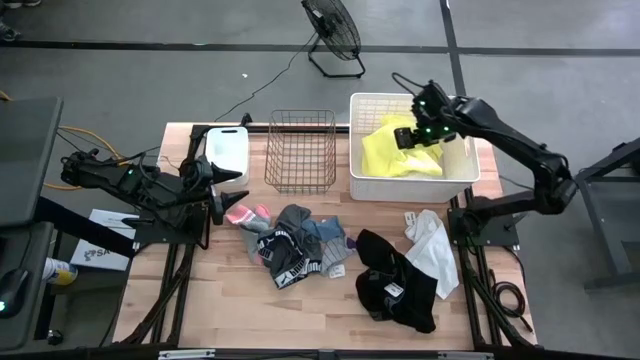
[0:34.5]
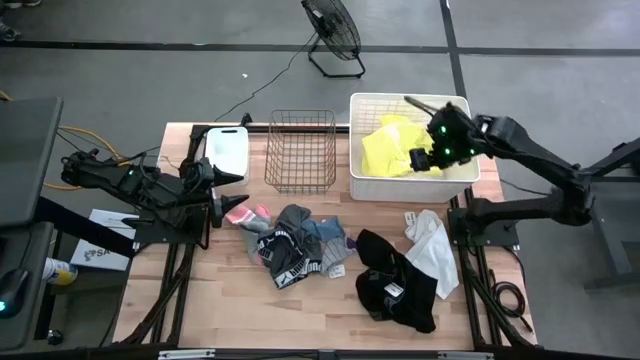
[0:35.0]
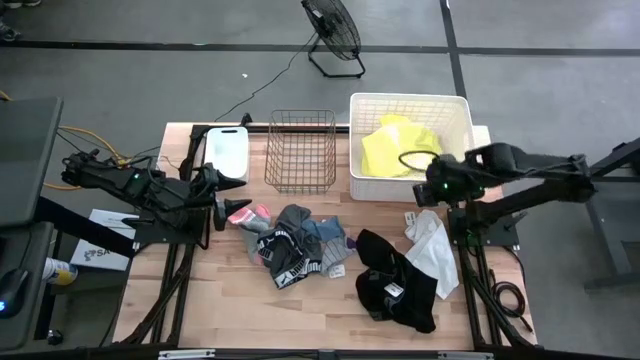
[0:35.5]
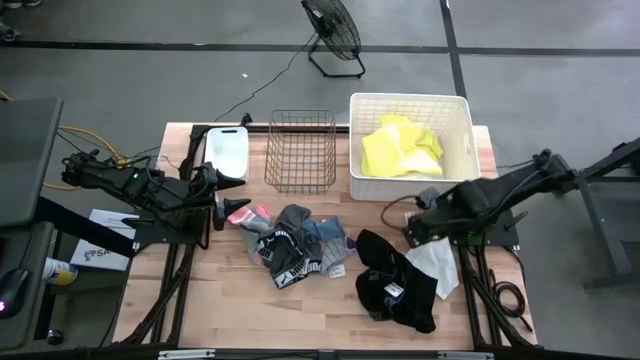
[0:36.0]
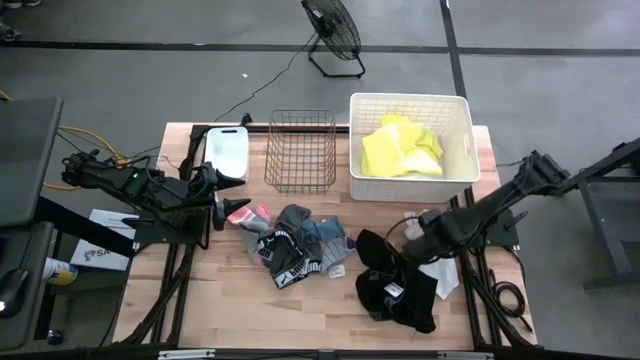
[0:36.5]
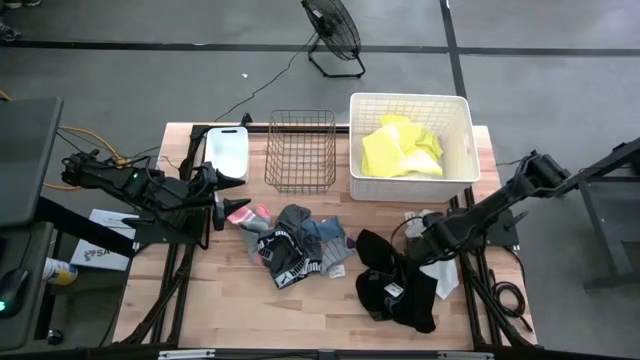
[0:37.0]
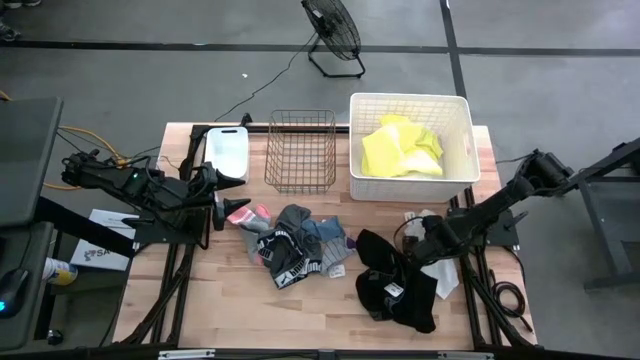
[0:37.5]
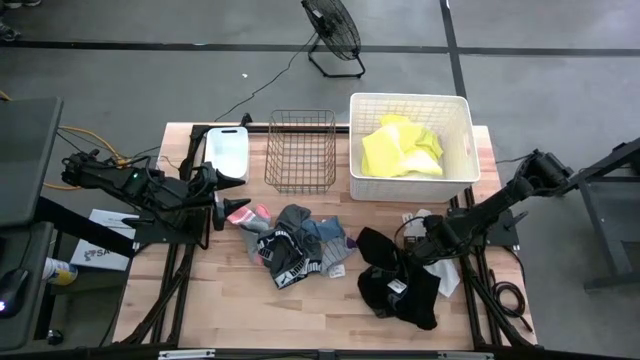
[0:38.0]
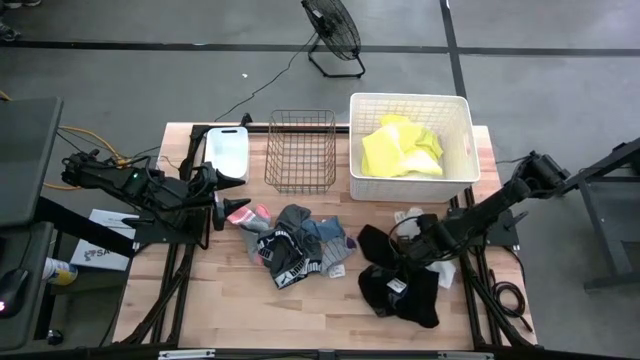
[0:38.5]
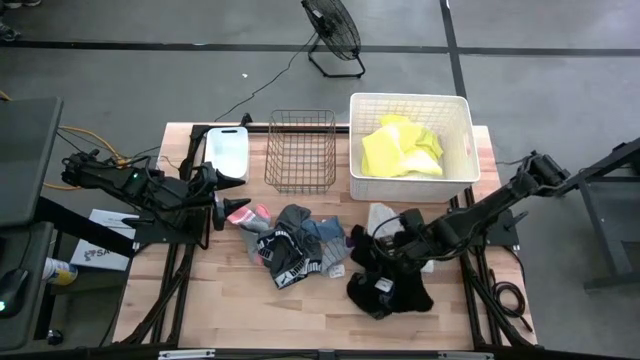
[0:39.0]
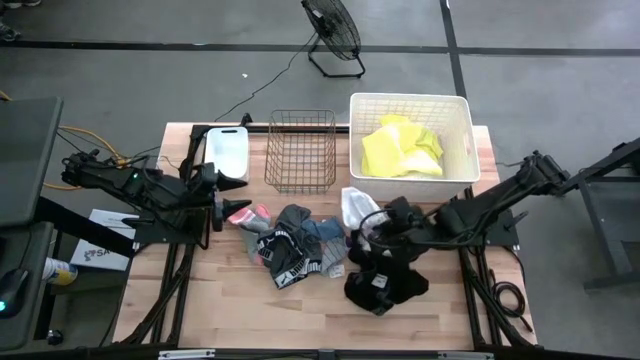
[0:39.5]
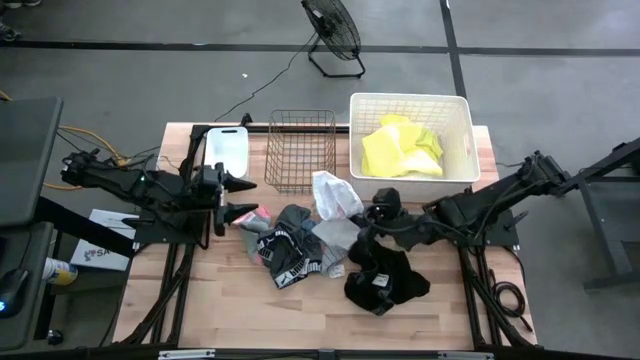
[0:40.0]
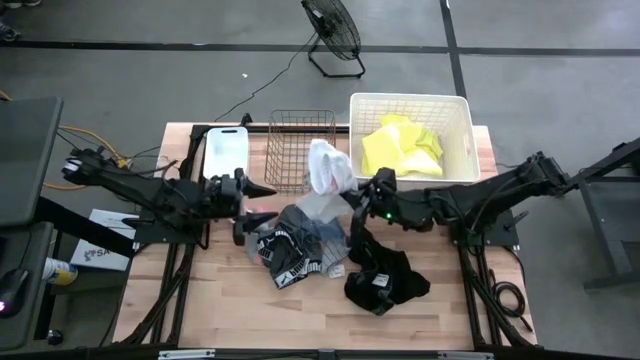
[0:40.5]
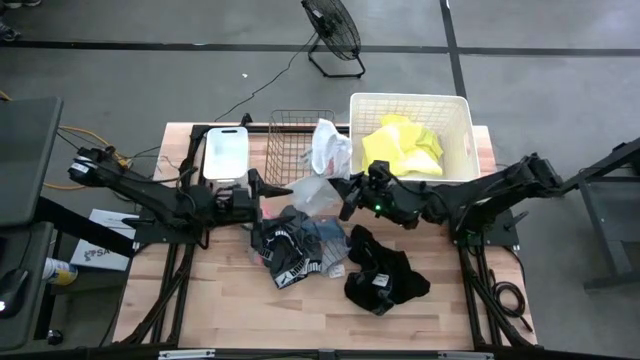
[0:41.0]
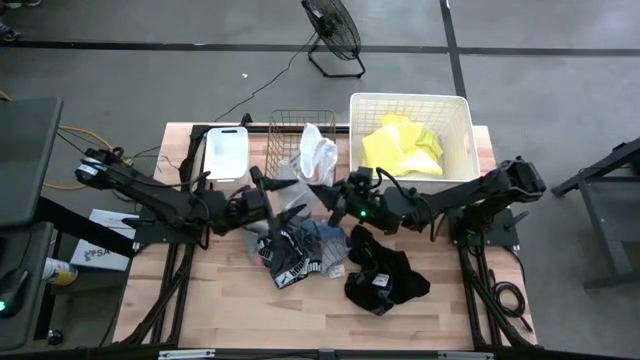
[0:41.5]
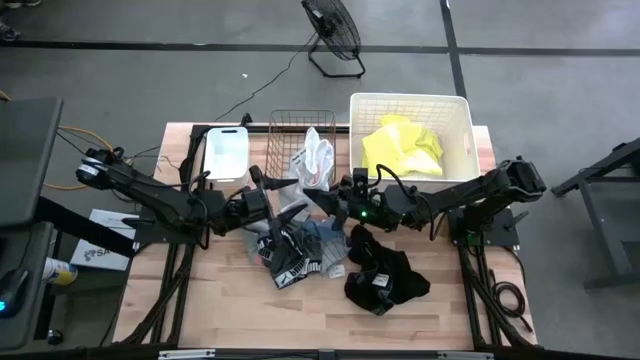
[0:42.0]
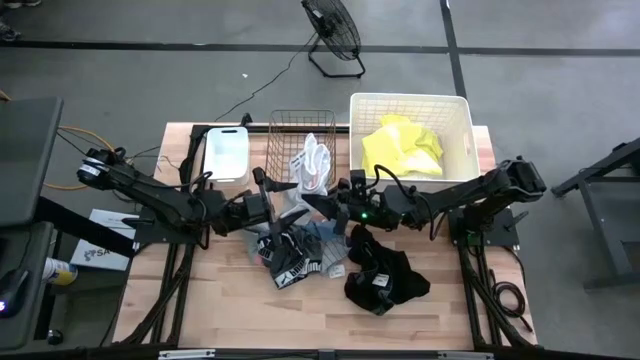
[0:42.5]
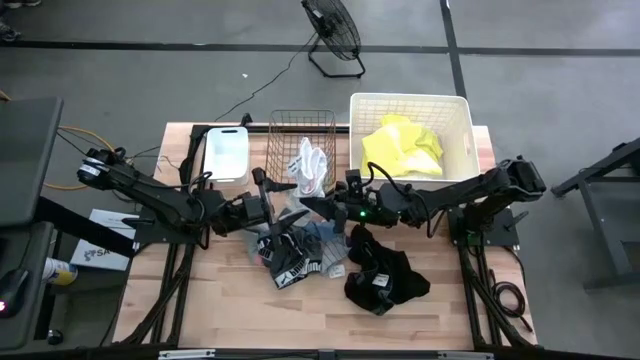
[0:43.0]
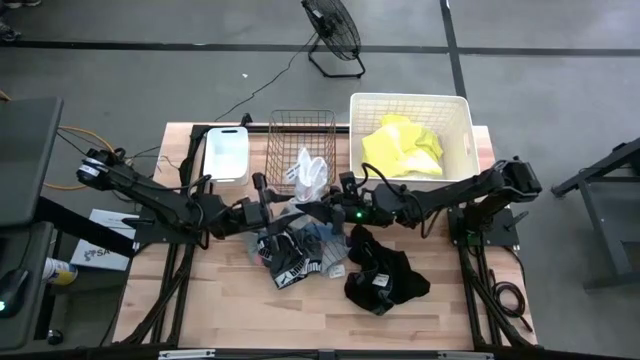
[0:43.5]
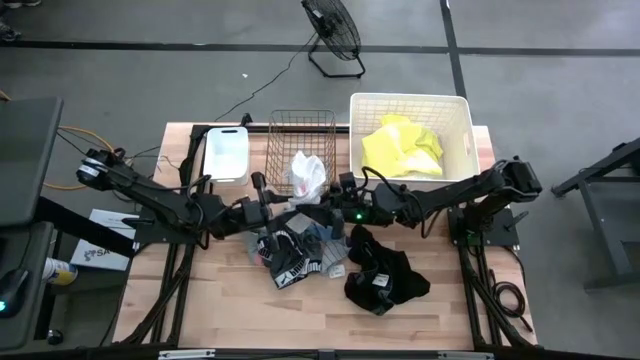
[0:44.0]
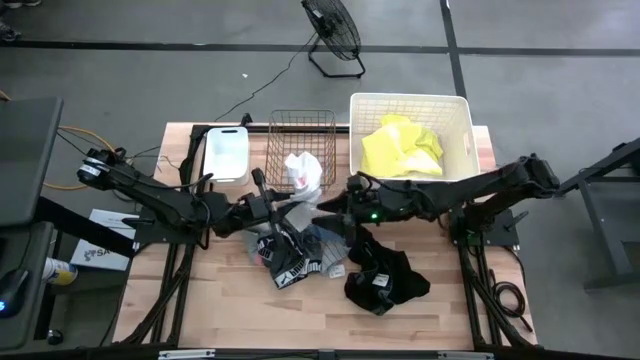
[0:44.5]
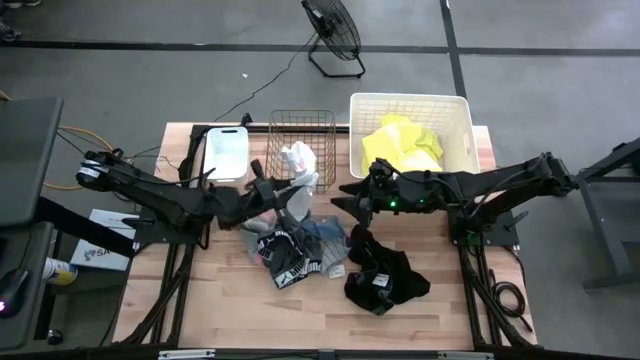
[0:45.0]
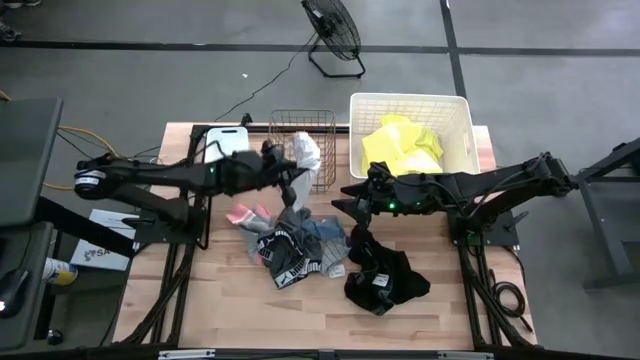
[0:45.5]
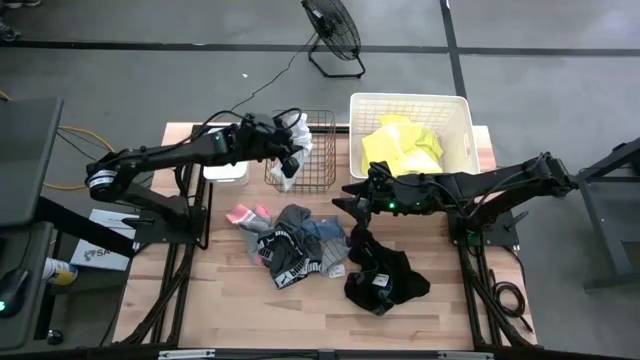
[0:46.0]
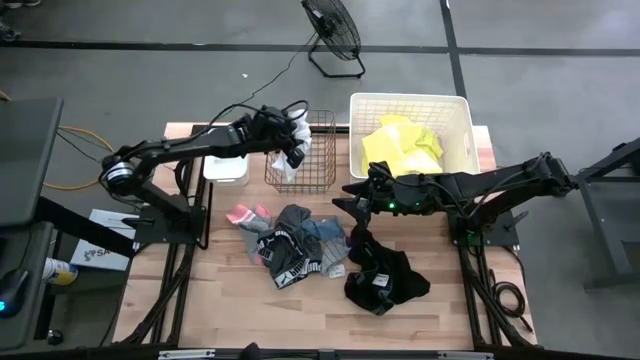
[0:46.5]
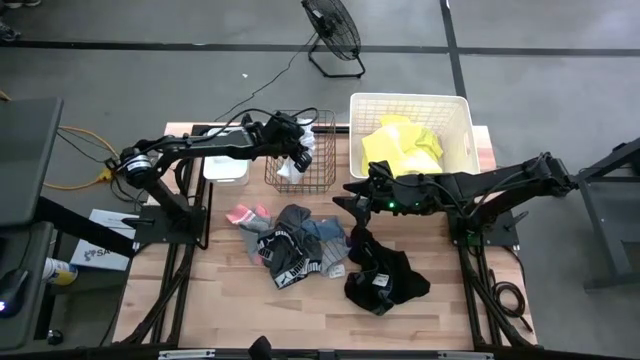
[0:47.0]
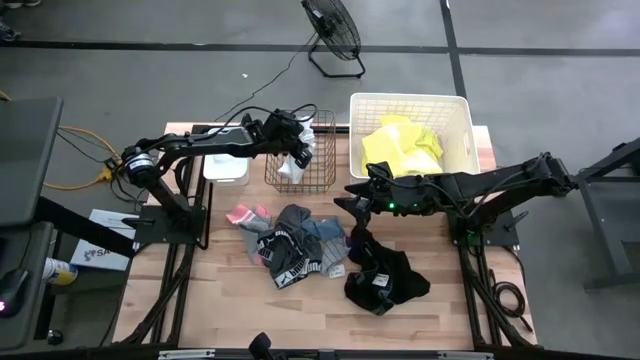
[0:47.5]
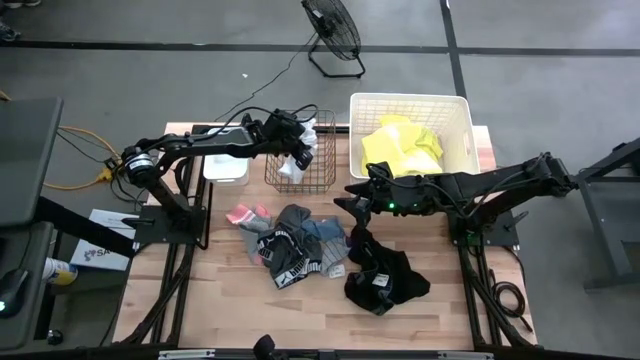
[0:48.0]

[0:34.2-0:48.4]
Task: Pick & Place Cloths
Put the white underwear into the gold wire basket

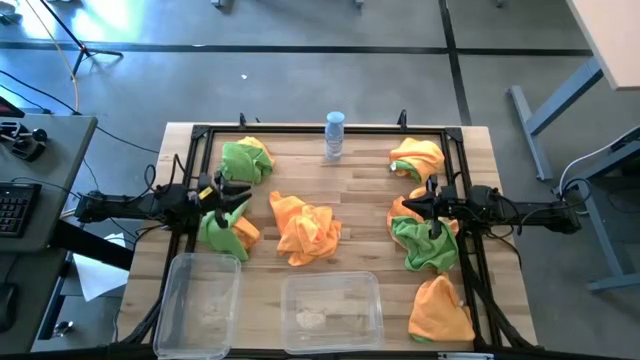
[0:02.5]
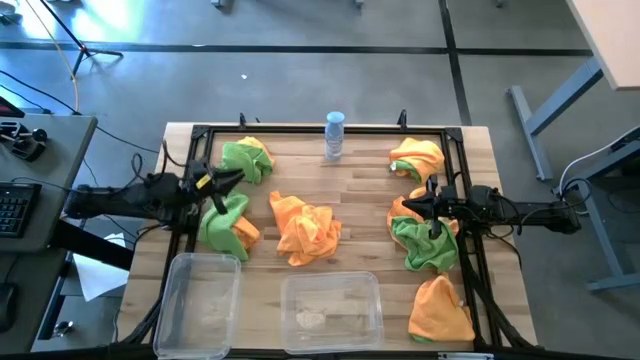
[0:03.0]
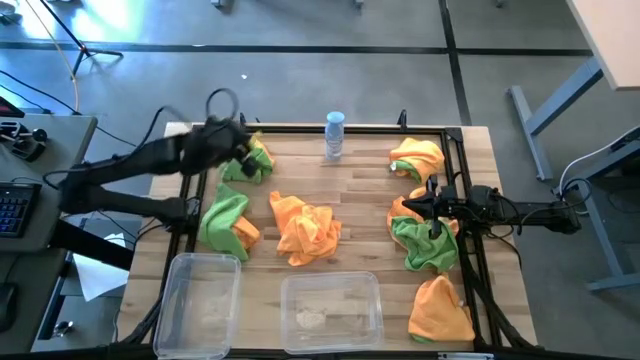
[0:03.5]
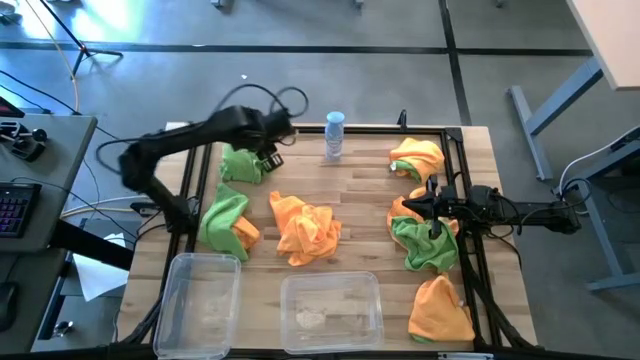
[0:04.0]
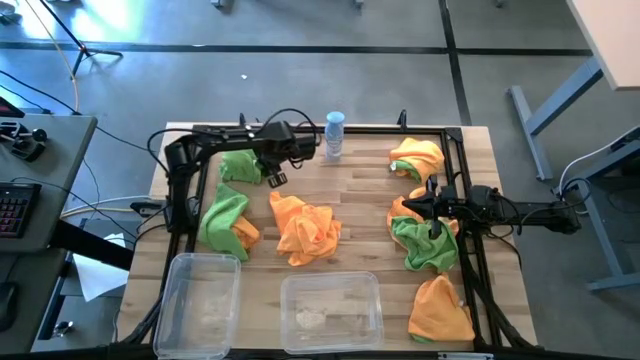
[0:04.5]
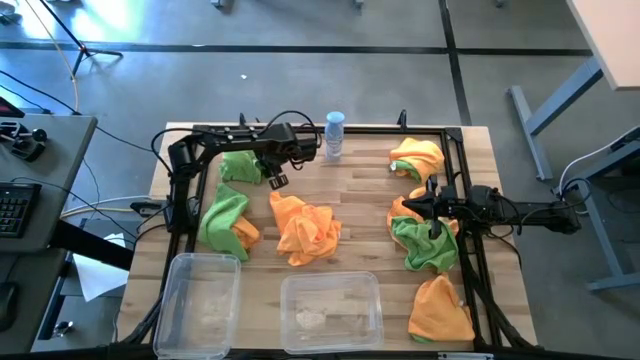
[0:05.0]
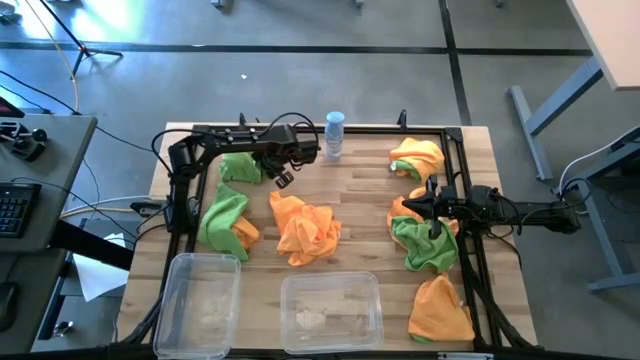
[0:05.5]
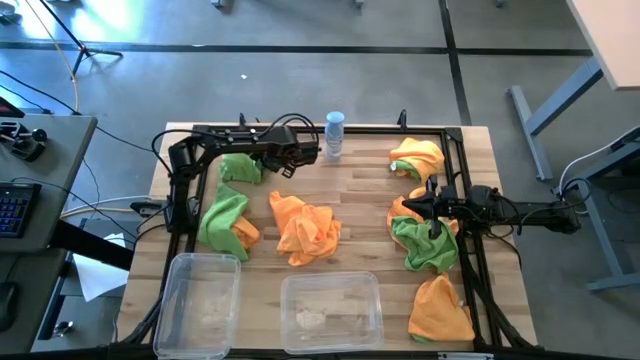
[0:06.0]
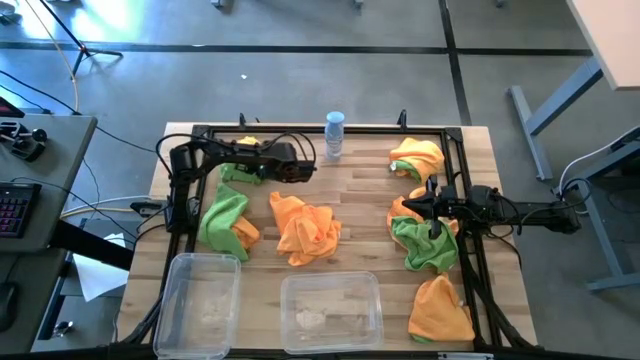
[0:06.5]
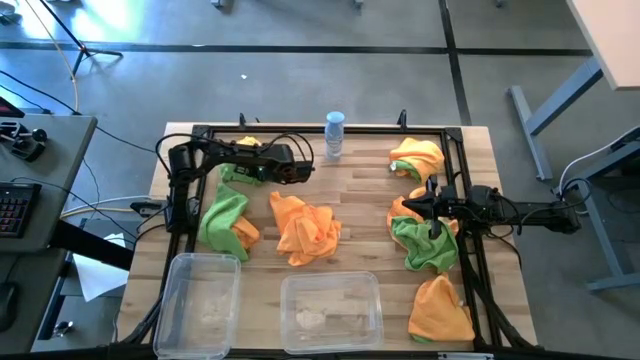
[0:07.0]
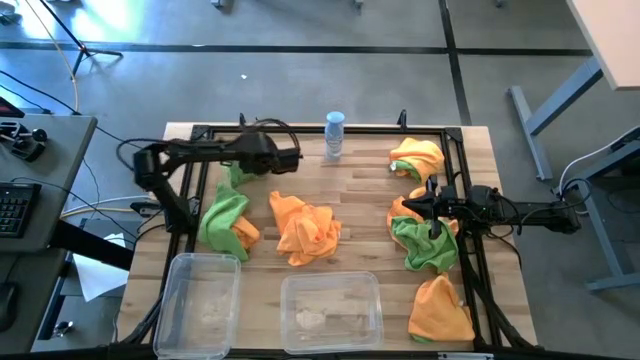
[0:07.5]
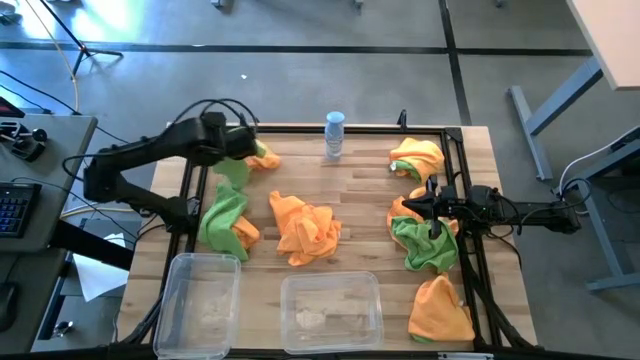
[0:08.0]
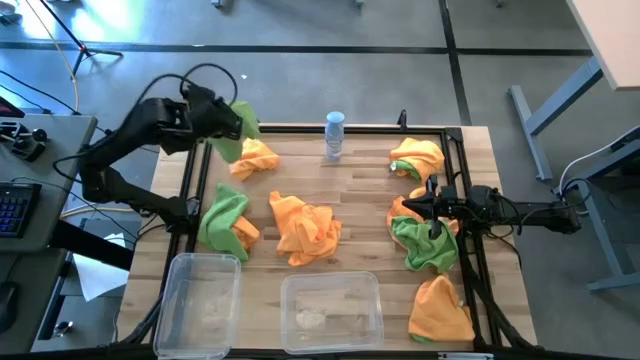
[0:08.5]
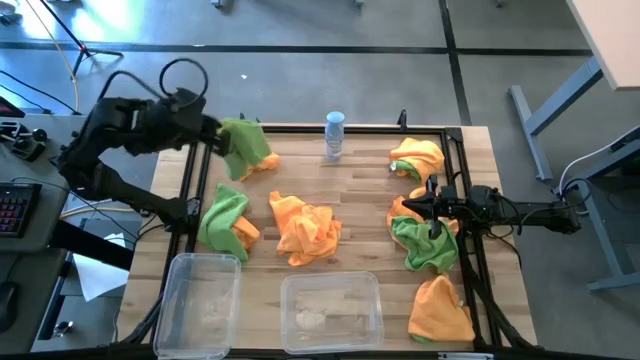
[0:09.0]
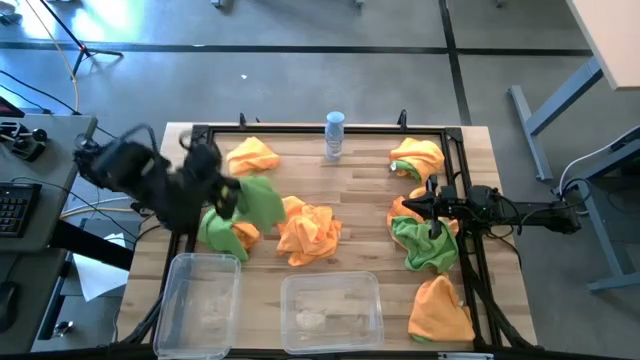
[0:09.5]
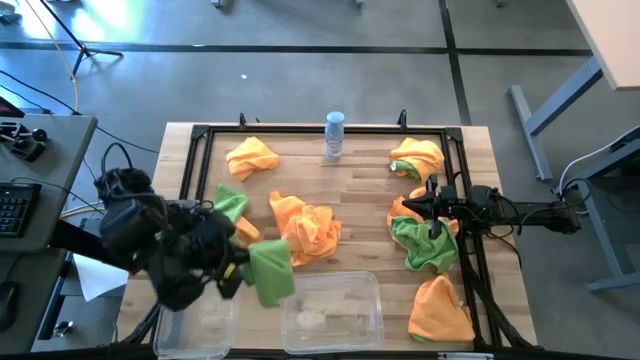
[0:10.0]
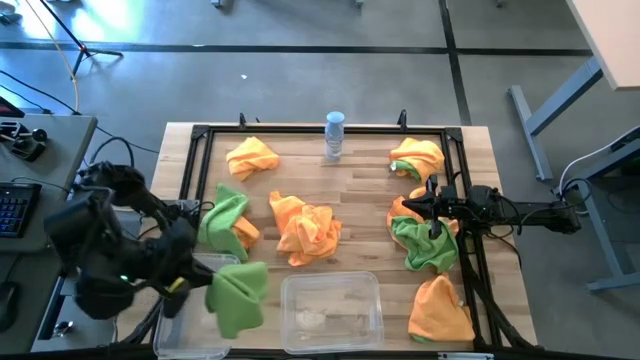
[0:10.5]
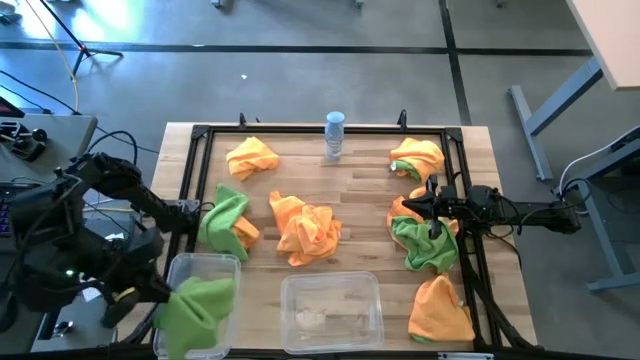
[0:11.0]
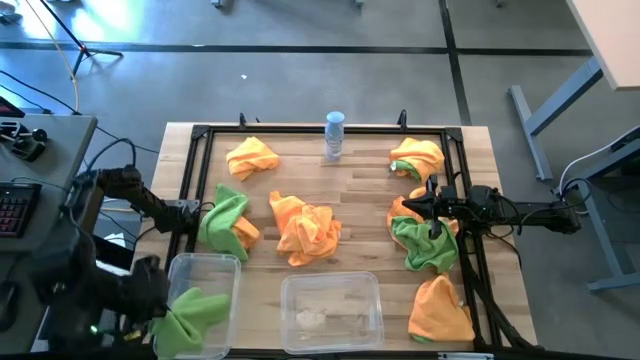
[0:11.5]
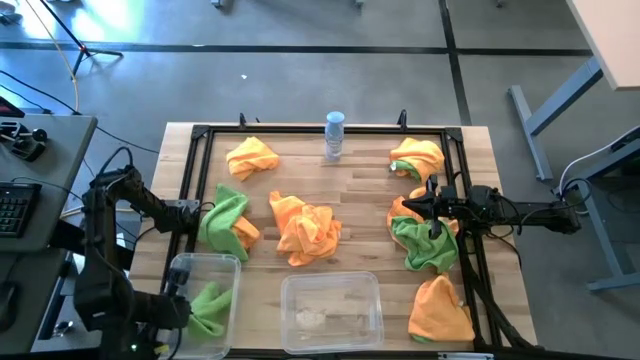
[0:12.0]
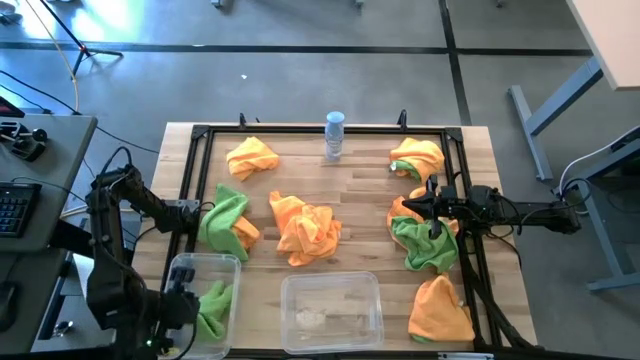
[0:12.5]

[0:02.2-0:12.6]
Task: Sort microfiber towel by color & place in baskets
Put the green microfiber towel into the left transparent bin
